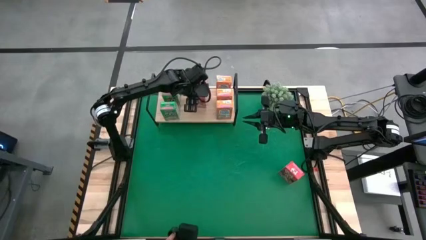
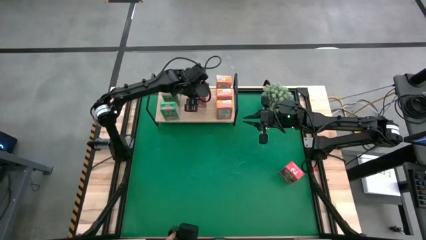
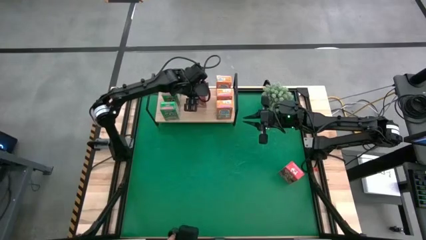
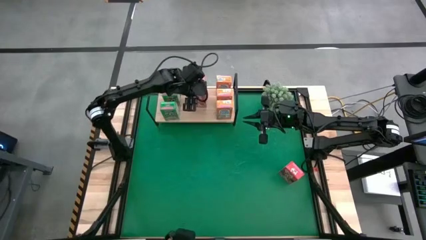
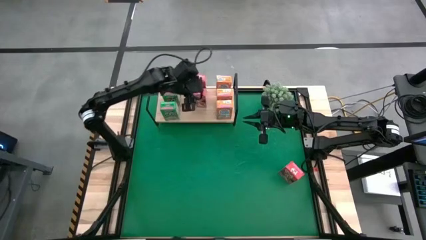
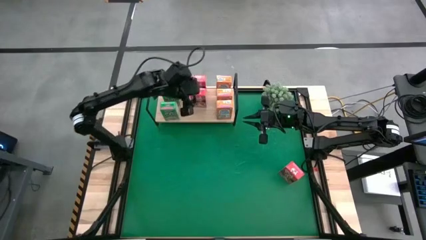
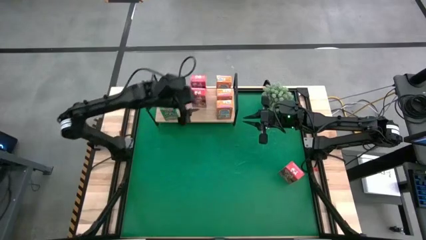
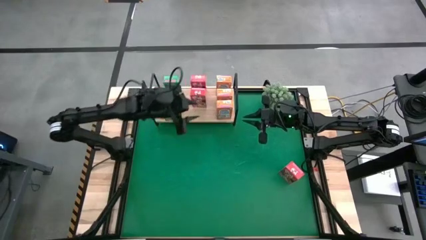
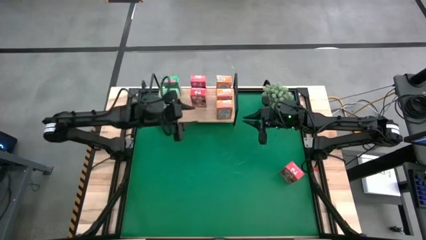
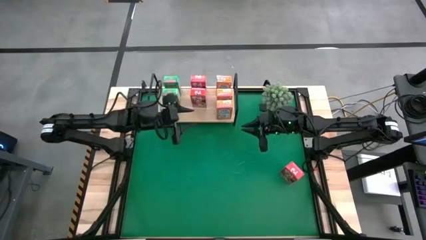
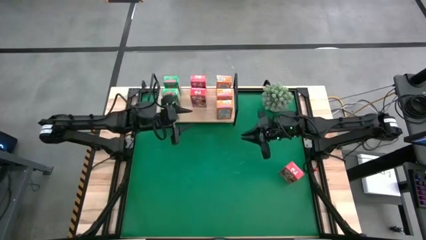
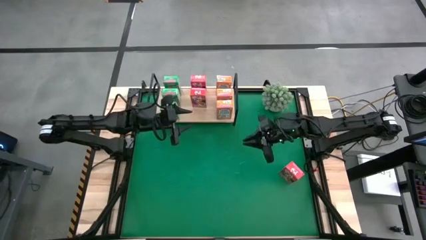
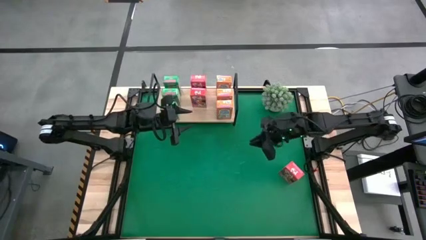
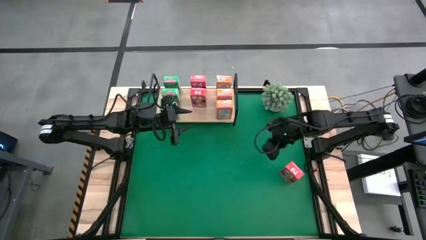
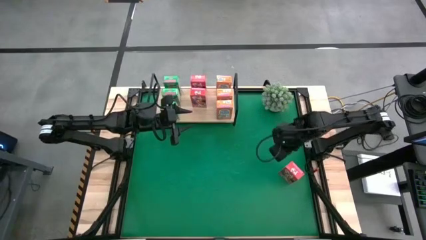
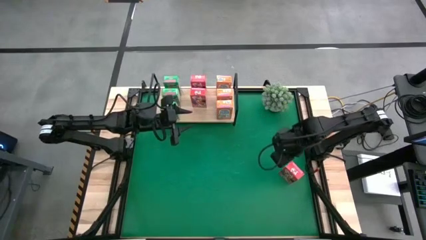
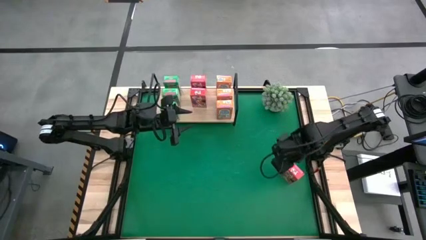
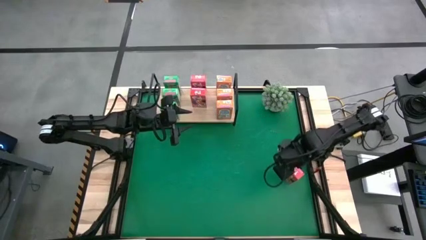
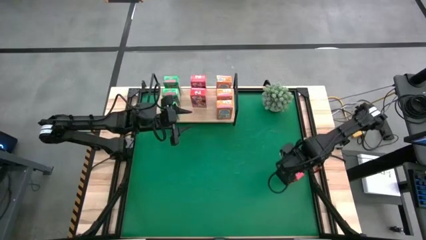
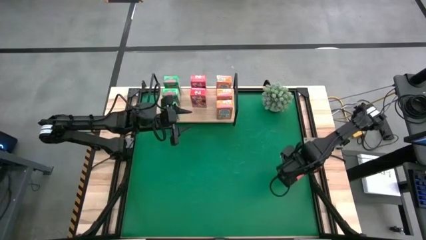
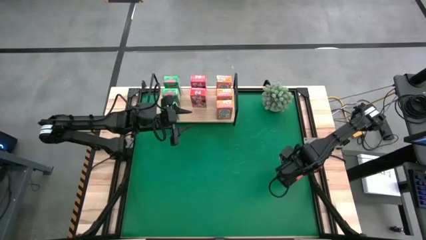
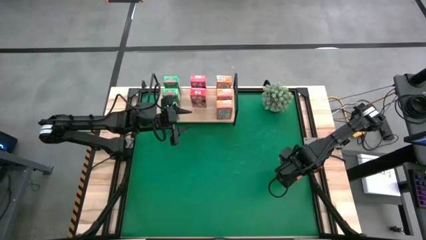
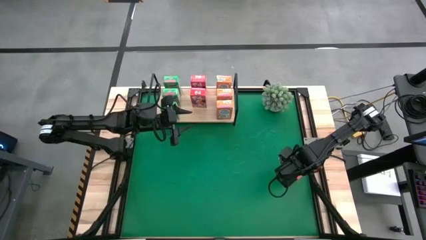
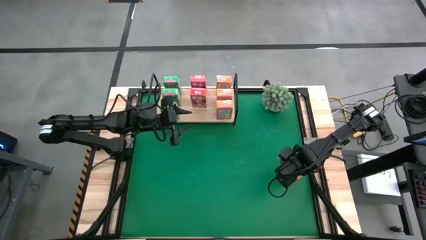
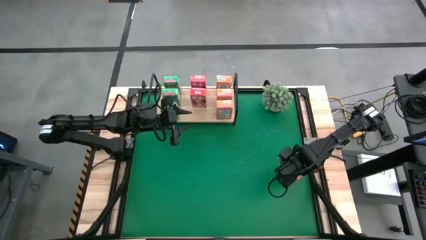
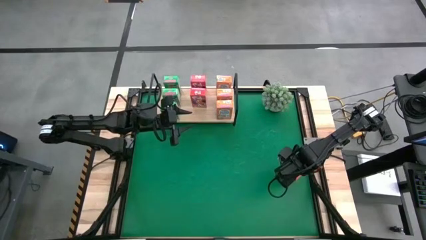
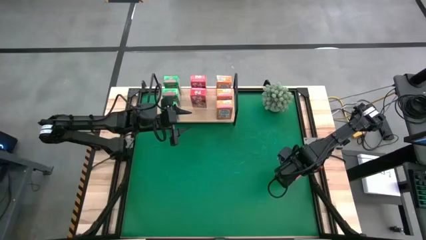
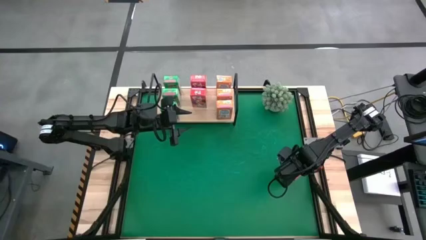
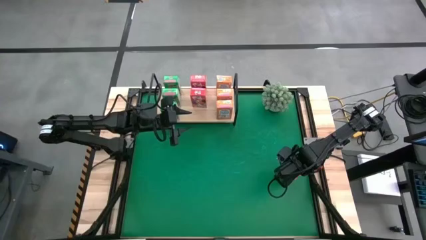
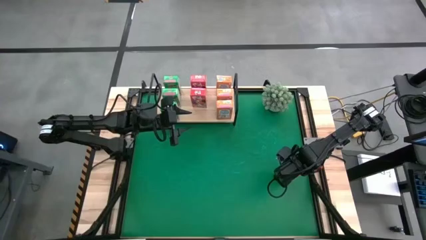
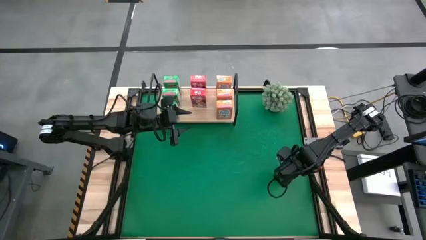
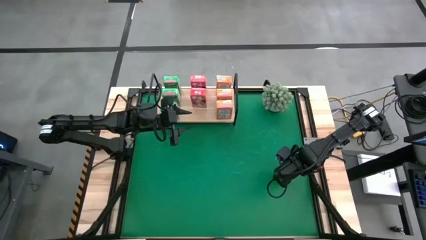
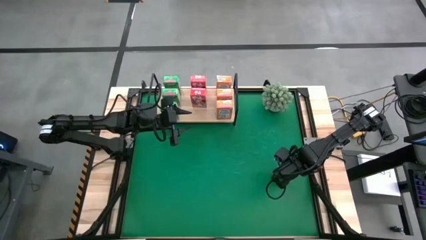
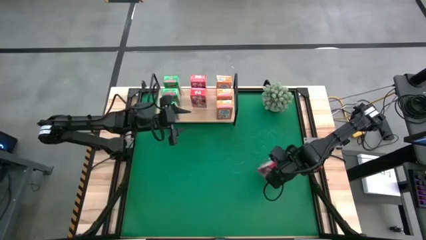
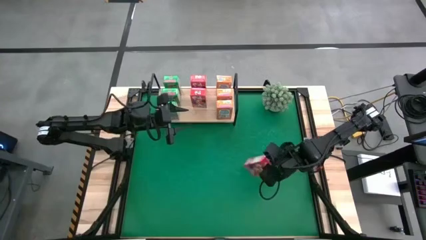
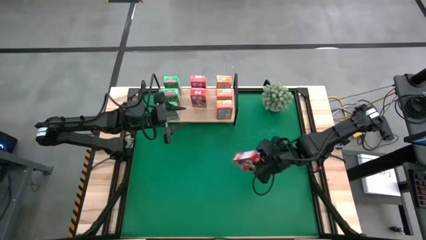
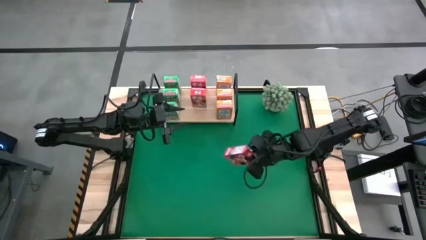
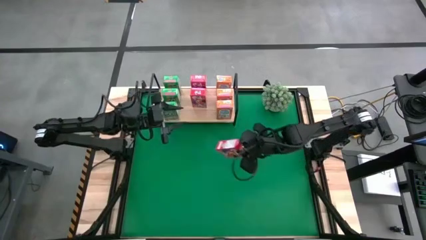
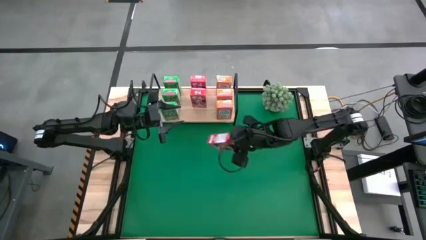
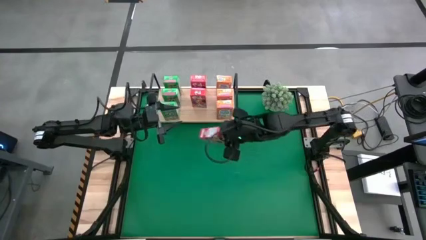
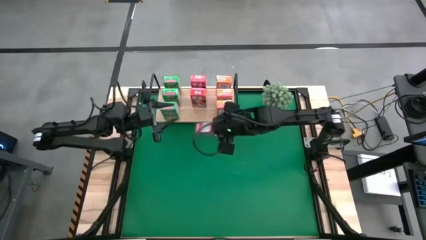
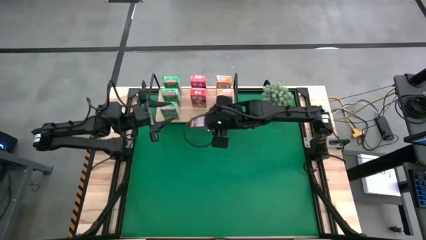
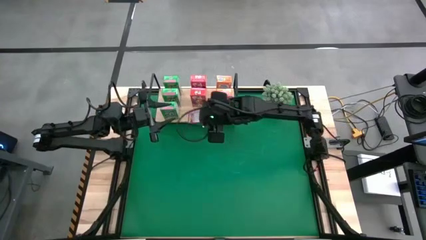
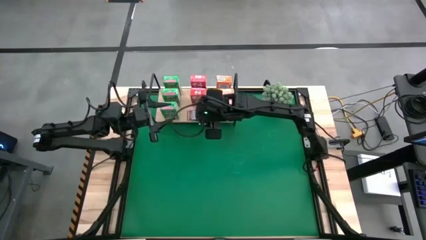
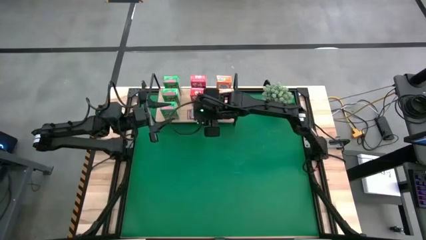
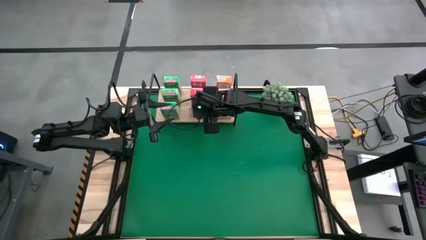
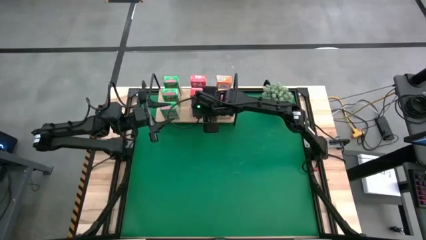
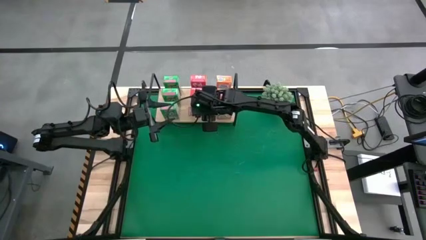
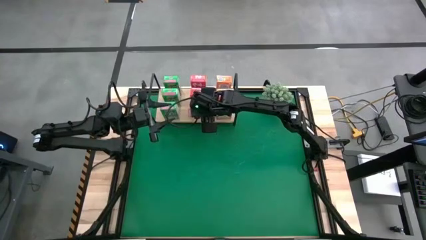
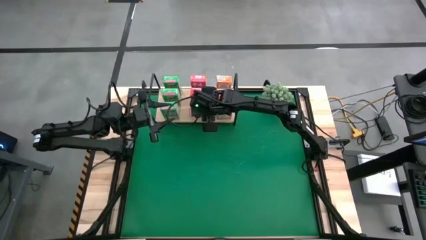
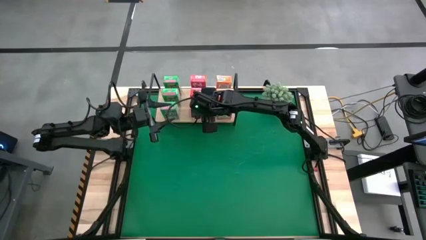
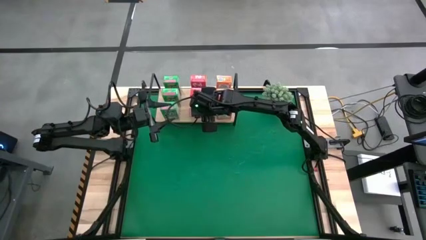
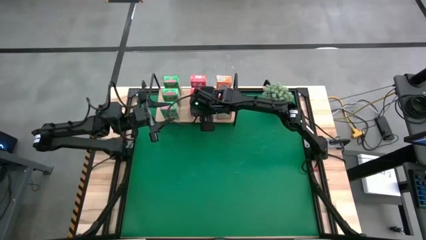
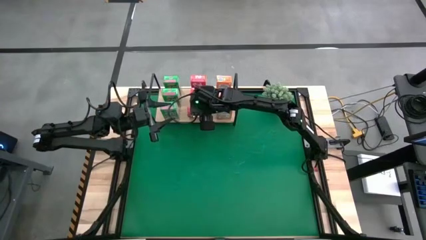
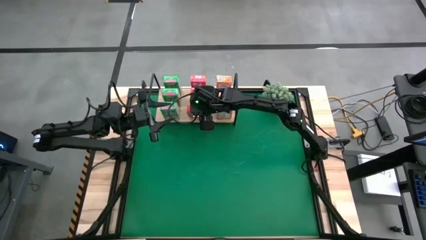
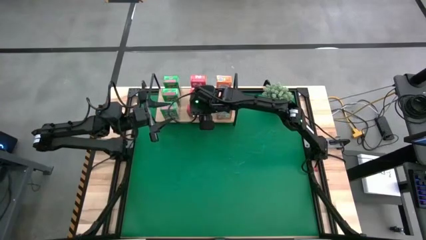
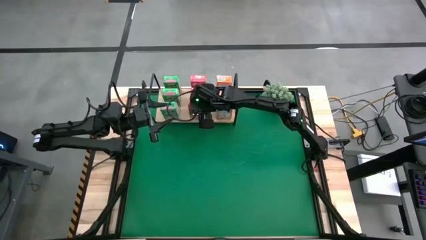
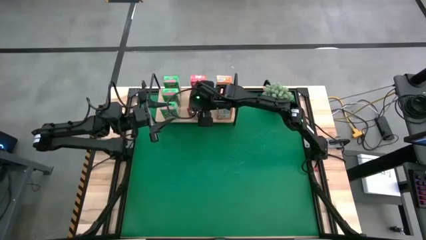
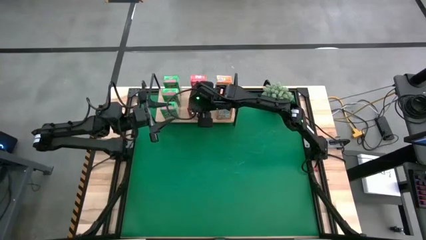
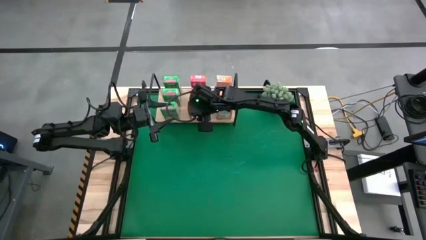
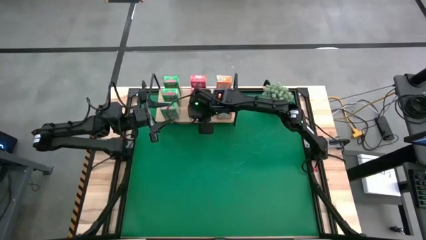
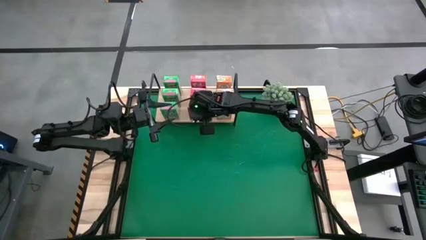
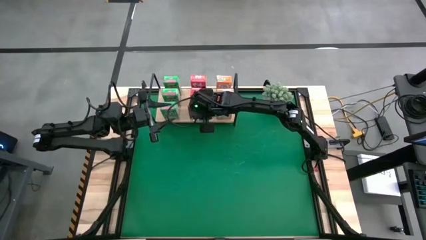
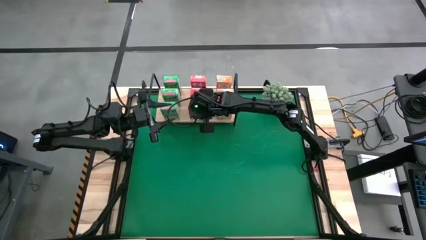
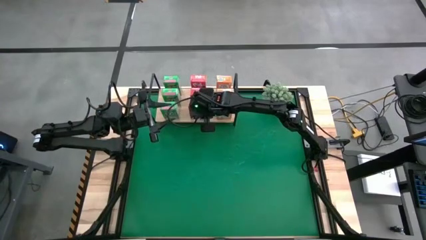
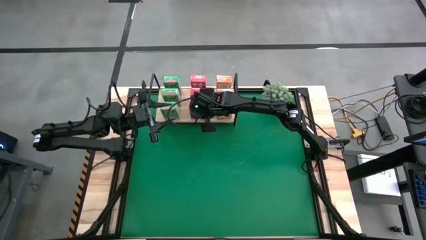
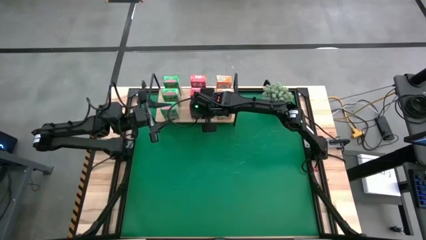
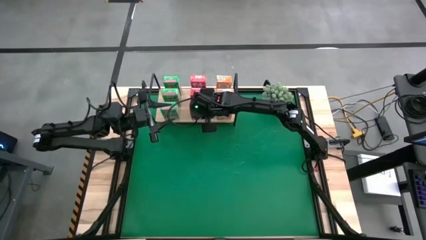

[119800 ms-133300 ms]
Task: Stack cereal on shelf
Put the red cereal box aligned with the other red cereal box on the shelf

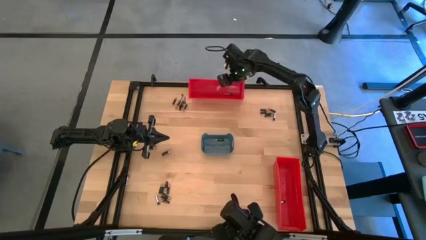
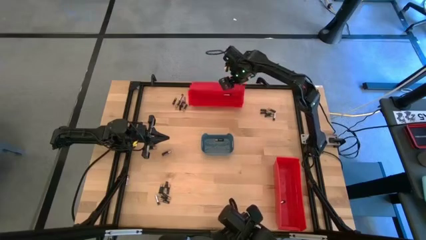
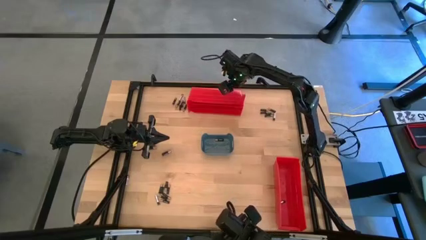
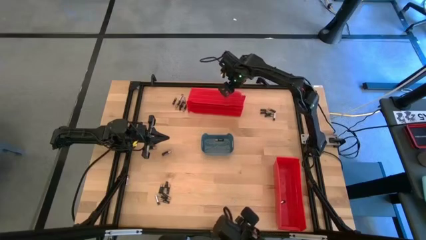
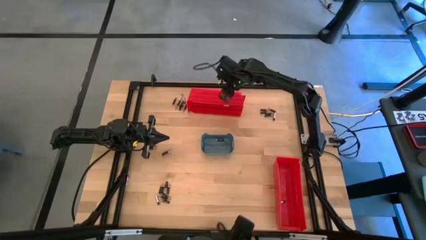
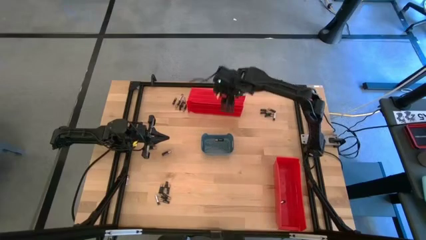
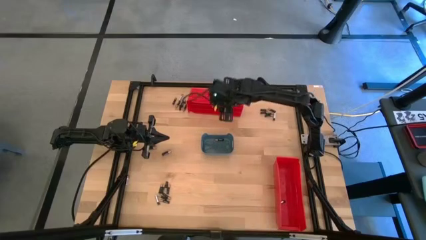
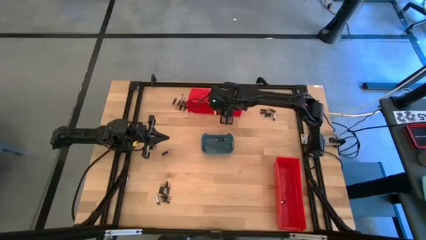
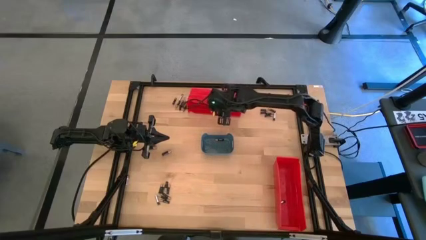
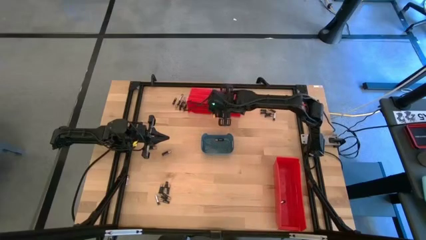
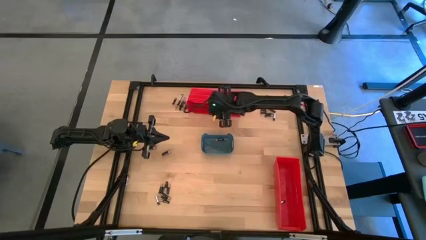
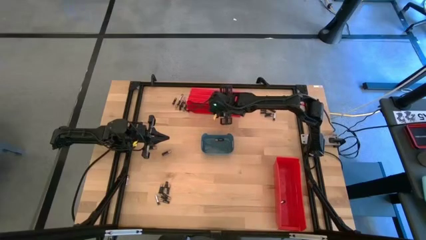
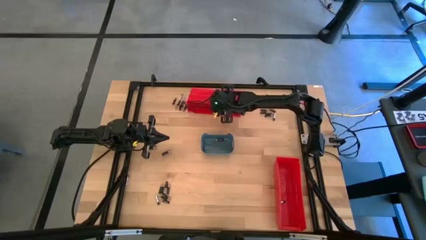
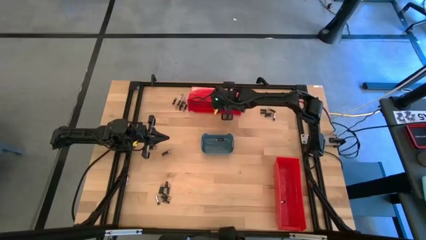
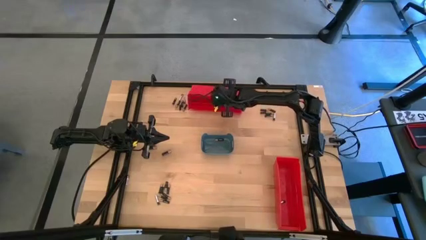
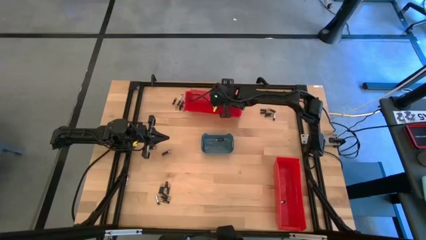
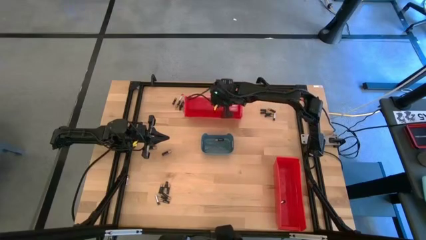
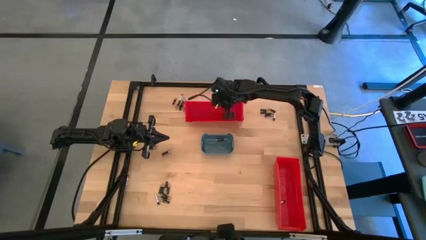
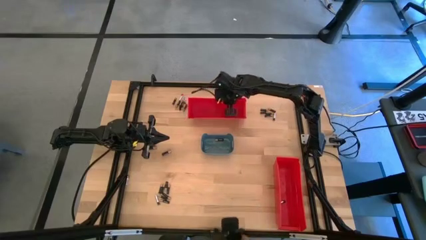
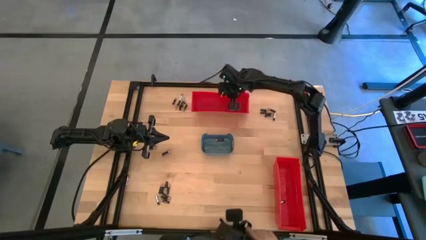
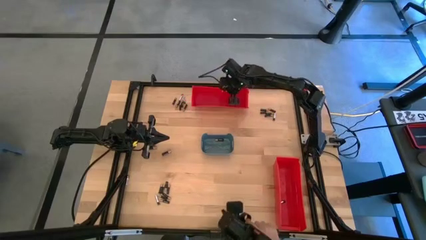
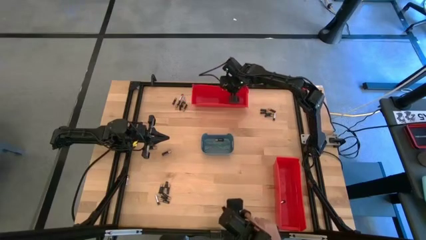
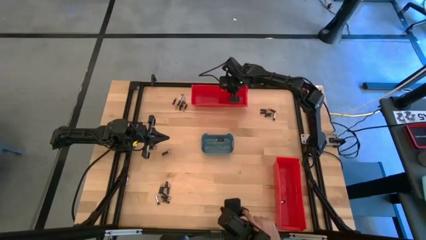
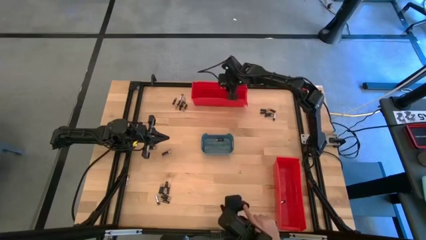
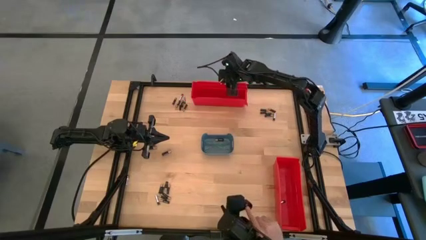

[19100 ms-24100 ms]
Task: Sort batteries
Adjust the top red bin
